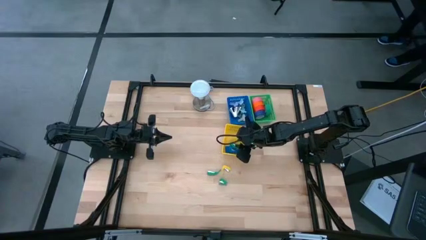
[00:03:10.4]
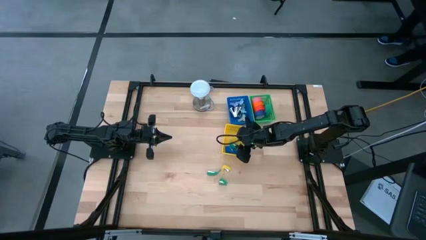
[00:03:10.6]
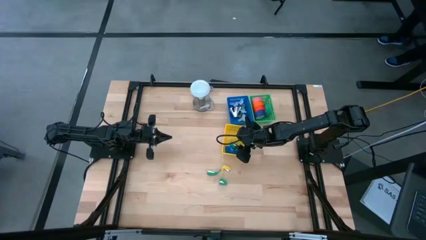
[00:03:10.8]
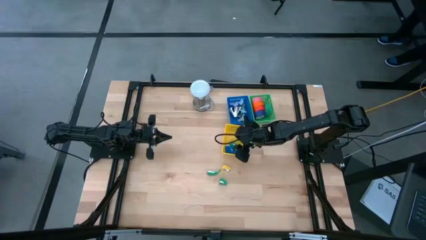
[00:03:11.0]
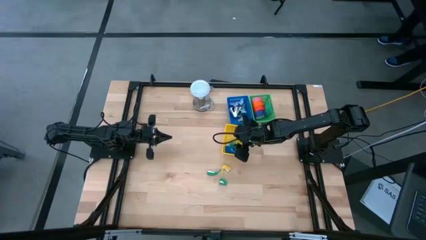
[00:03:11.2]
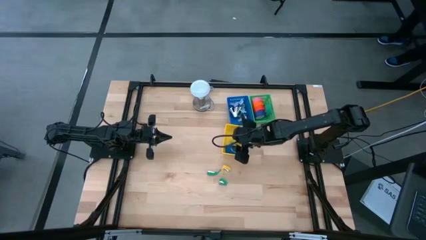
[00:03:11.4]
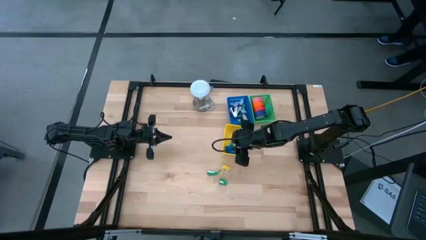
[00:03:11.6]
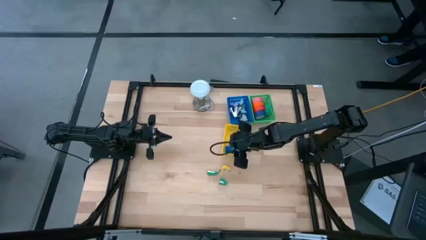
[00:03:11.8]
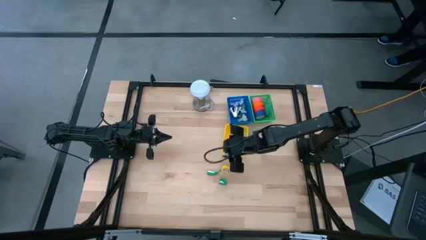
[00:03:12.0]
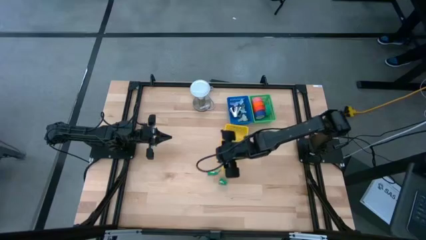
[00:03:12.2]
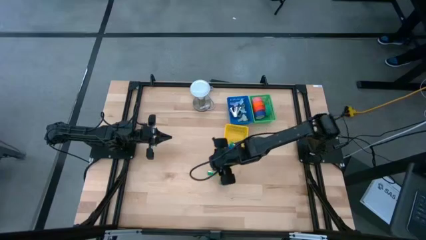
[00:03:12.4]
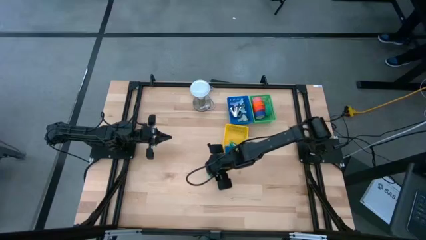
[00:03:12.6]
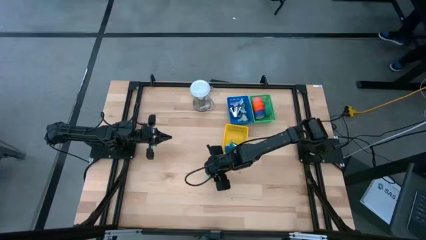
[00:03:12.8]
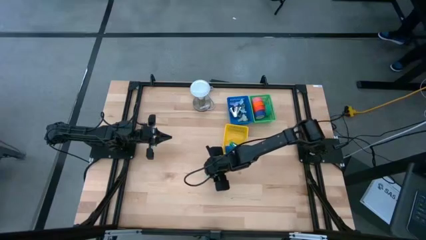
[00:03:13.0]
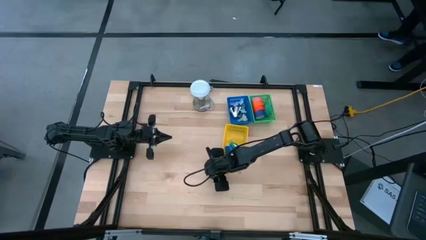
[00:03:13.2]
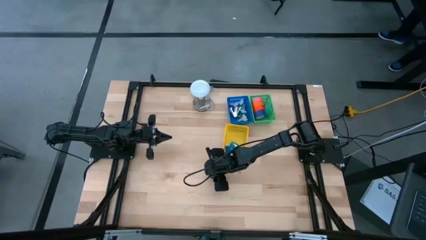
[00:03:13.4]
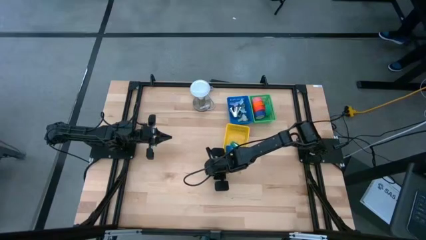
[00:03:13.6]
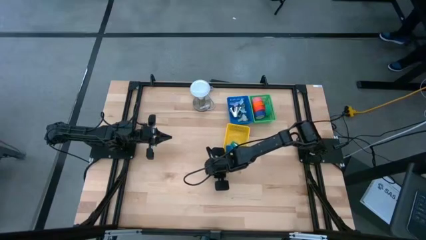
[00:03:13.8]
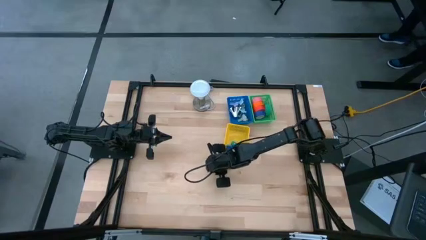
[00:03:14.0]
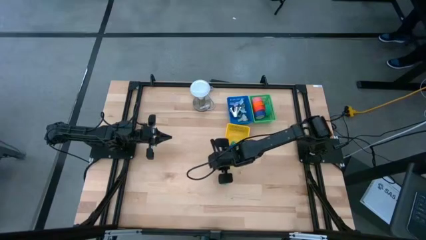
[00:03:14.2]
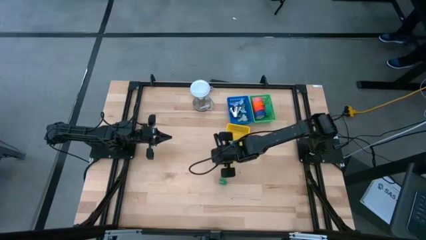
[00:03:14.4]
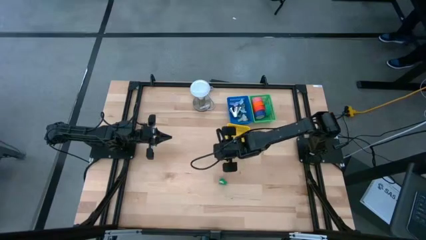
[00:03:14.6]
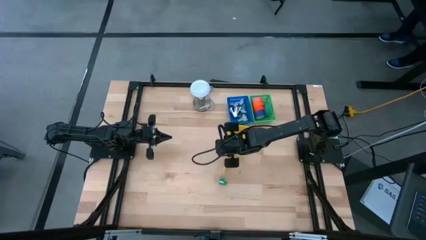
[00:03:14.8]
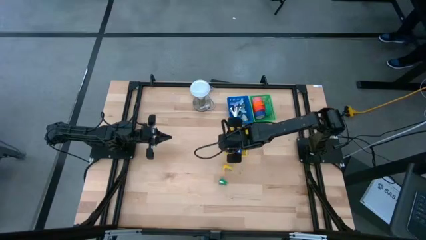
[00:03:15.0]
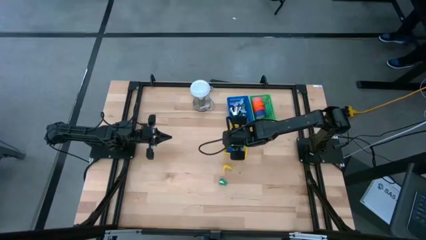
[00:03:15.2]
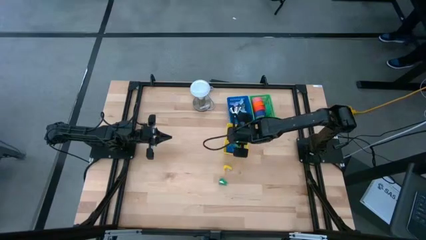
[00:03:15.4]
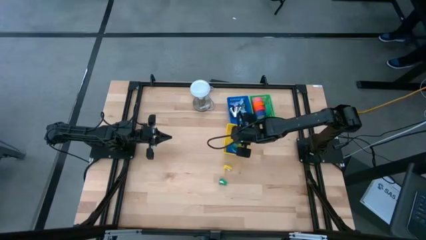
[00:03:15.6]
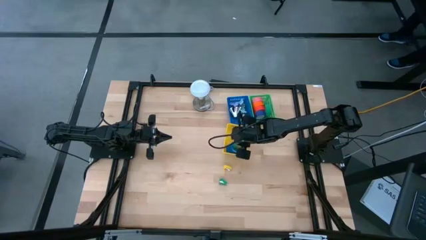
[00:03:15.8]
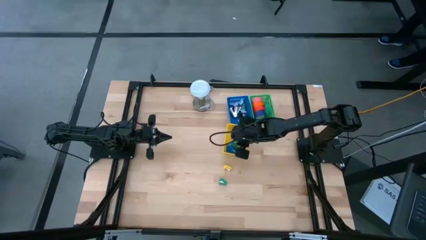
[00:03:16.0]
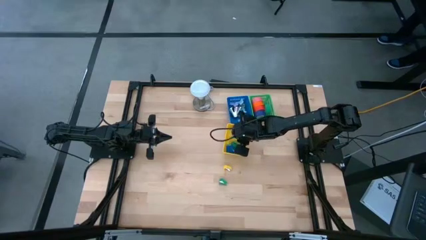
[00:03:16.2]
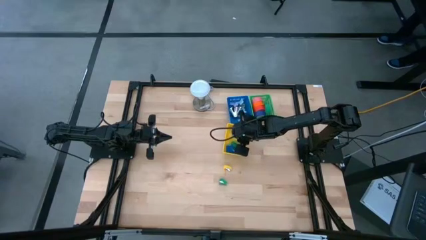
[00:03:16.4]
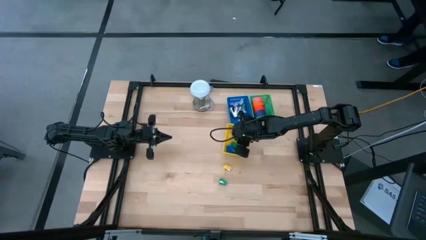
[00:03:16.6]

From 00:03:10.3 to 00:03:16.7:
Task: Pick and place Stapler, Stapler remover, tape
Put the green stapler into the yellow bin

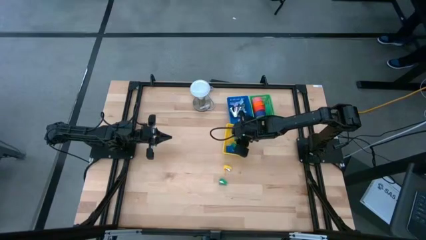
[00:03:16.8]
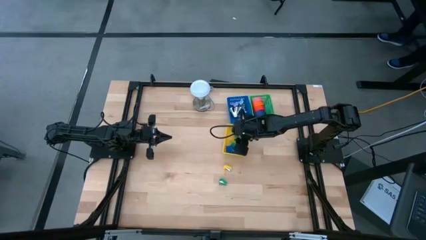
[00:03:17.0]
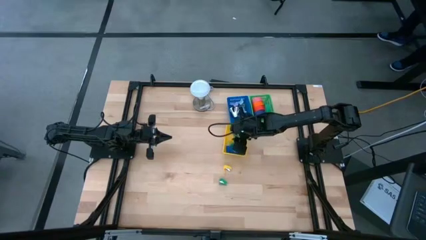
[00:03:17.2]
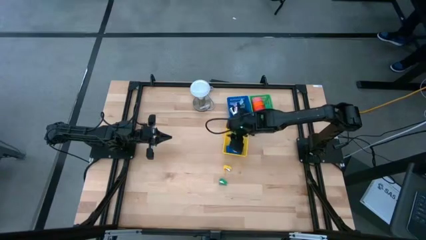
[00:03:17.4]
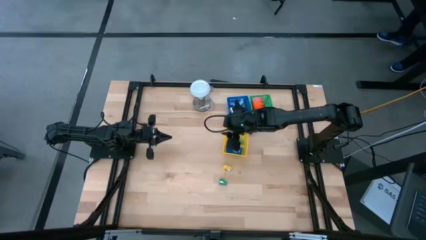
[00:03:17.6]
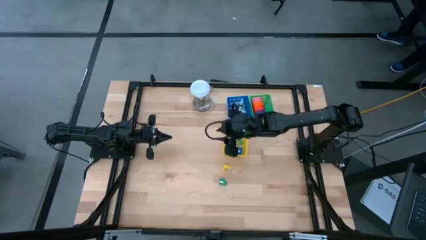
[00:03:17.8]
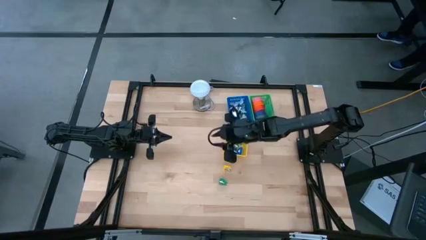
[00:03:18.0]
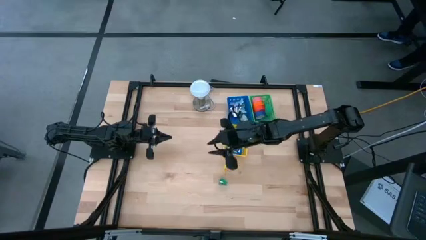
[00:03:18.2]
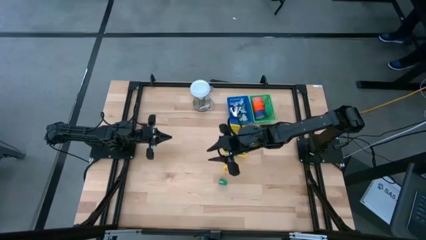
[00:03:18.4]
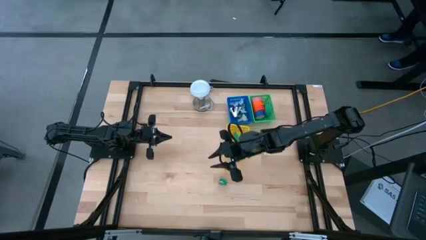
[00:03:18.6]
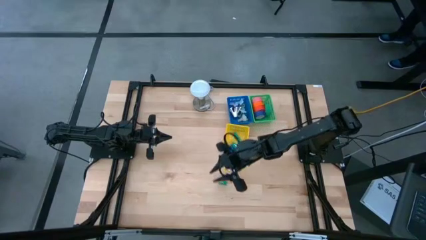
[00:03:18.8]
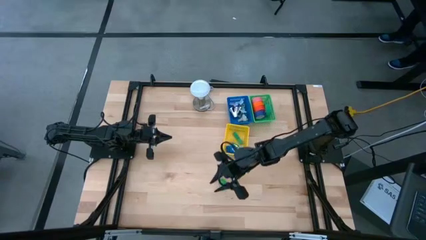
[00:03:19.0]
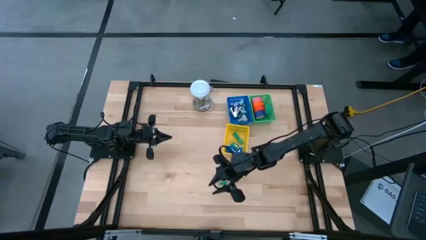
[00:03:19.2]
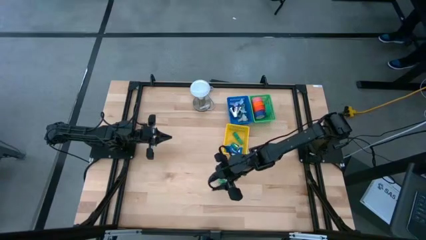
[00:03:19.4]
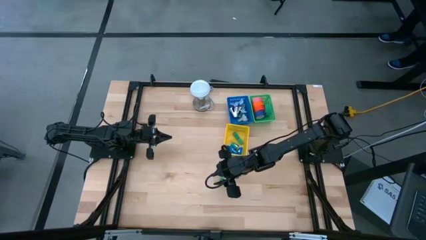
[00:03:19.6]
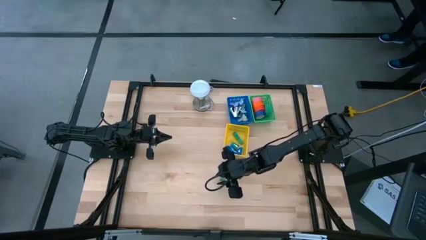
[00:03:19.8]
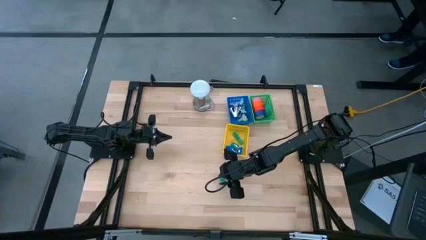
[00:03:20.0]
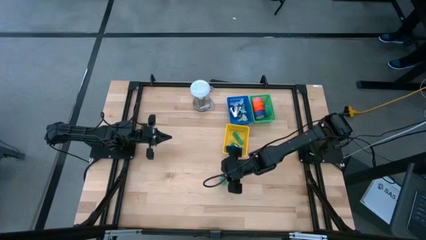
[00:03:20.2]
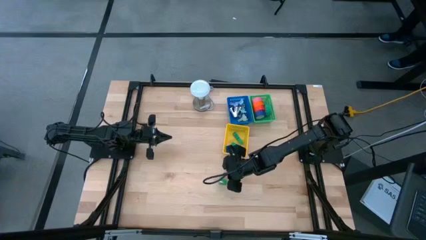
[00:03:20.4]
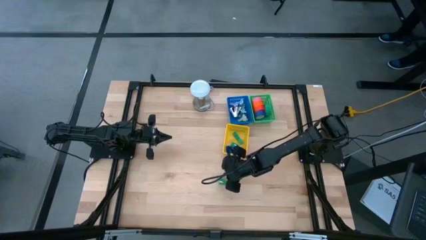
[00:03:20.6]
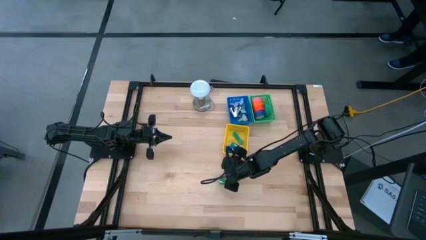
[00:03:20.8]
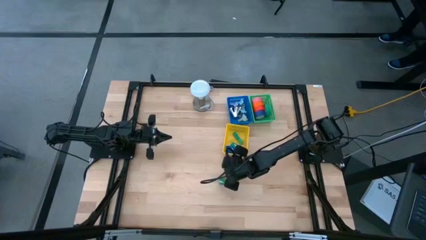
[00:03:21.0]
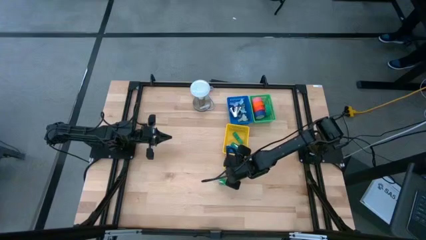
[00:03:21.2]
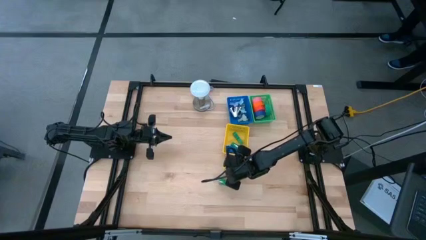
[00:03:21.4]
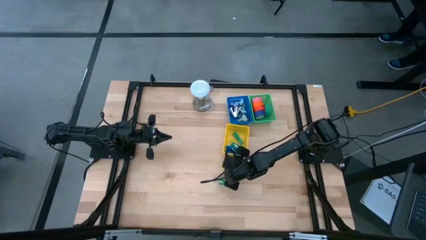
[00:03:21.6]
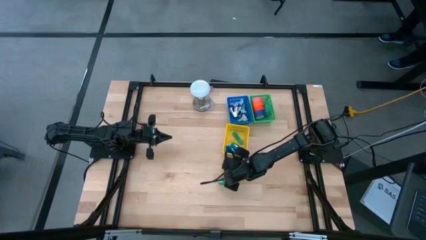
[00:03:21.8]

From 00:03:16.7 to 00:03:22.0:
Put the yellow stapler into the yellow bin

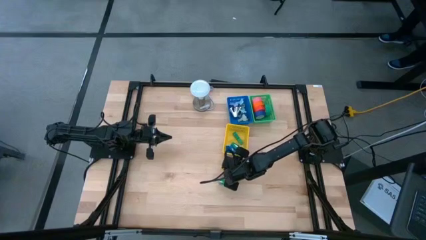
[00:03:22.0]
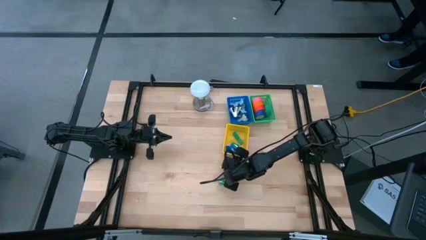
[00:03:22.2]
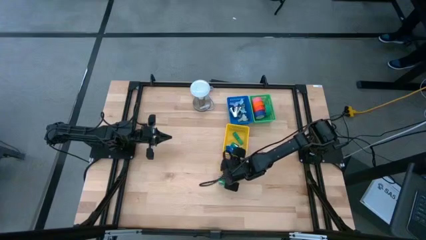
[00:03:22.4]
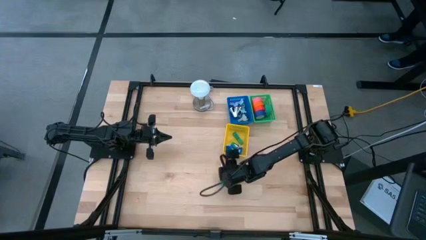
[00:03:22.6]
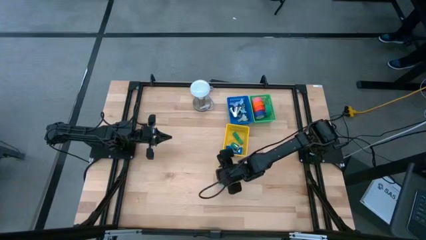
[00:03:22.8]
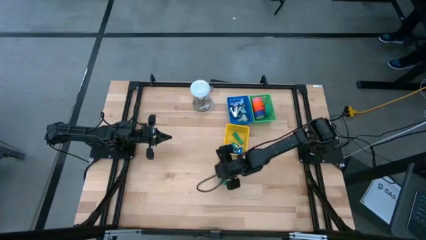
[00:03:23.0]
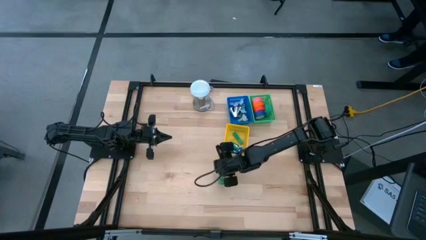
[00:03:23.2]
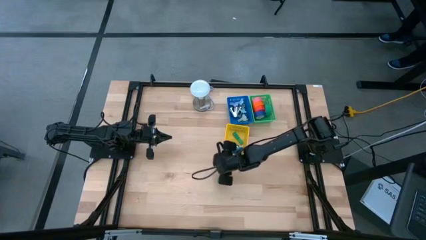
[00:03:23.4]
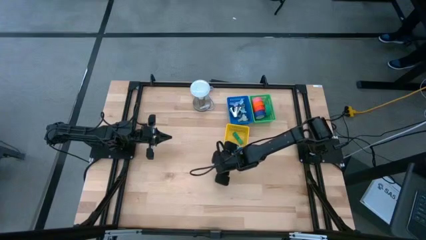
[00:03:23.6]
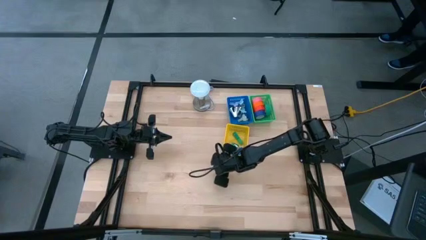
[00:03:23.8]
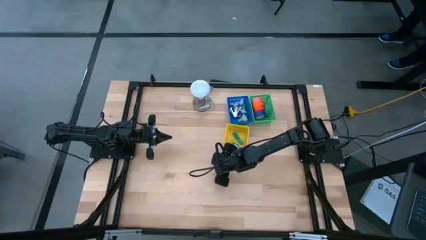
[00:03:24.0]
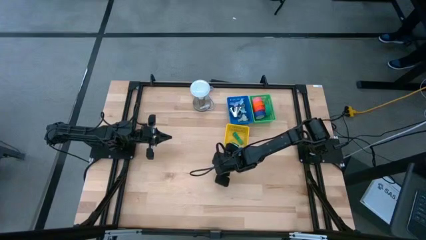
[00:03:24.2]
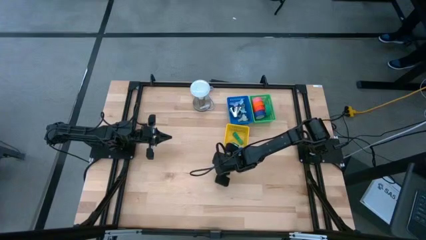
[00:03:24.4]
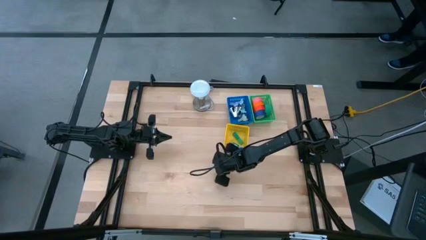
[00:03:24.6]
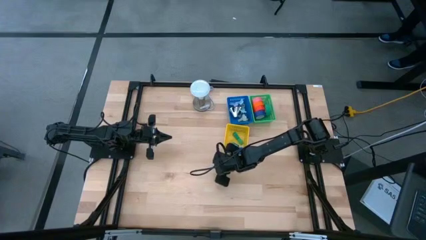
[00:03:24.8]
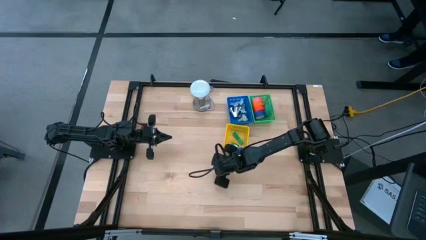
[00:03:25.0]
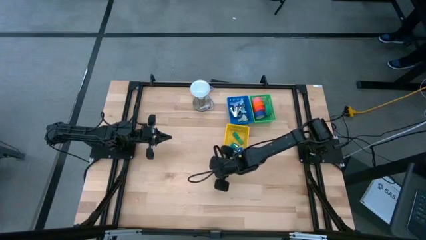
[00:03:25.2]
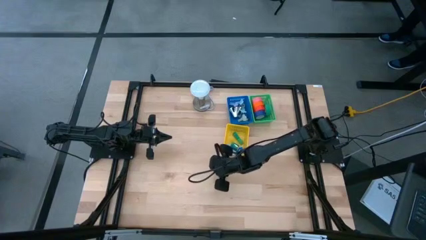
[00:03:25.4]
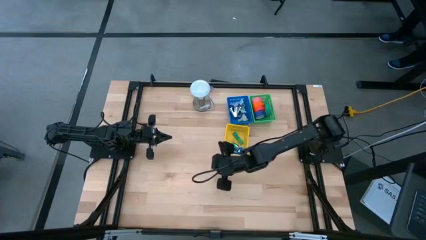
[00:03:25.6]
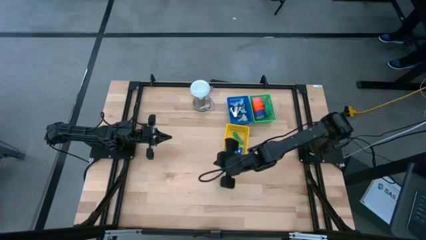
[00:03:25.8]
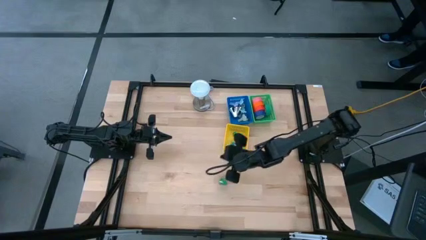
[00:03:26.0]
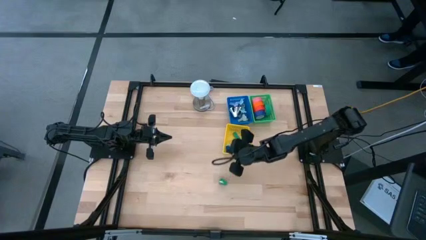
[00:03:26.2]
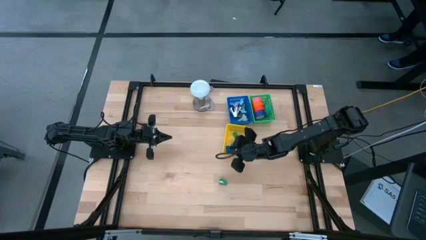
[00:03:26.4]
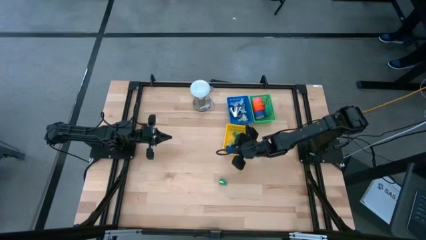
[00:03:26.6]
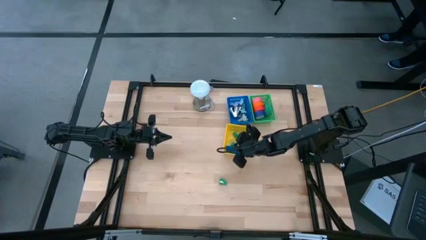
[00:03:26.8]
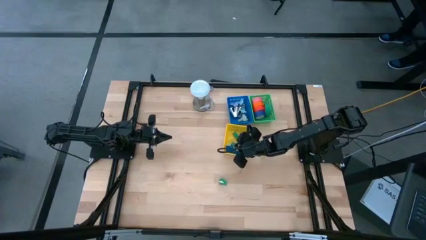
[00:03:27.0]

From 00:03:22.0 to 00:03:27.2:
Put the yellow stapler into the yellow bin
